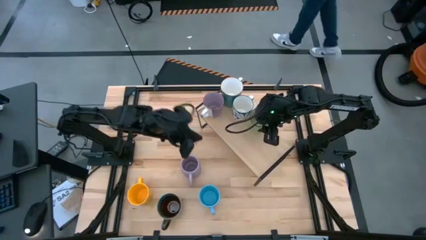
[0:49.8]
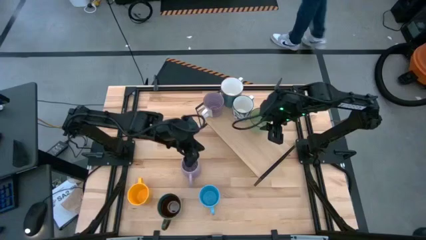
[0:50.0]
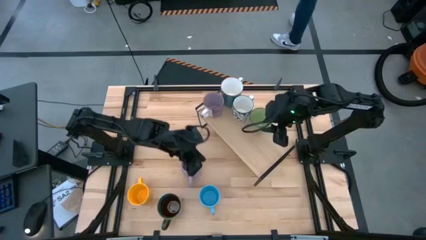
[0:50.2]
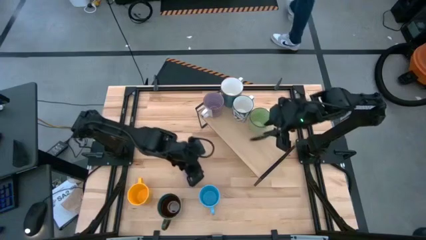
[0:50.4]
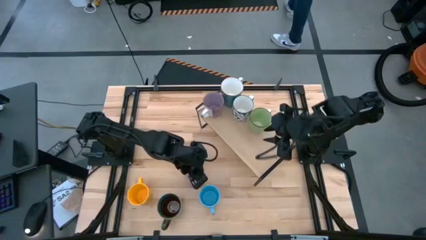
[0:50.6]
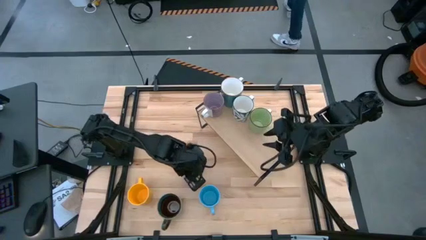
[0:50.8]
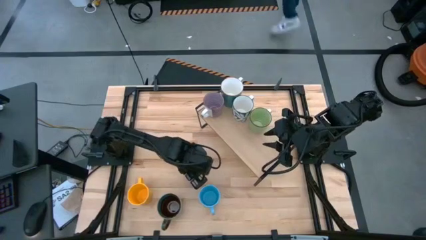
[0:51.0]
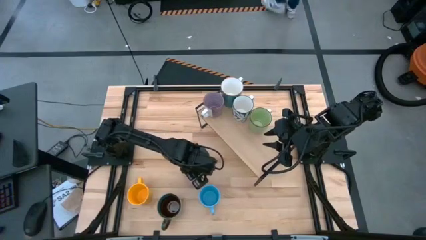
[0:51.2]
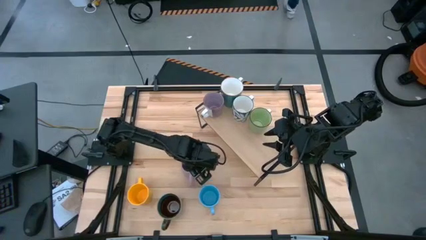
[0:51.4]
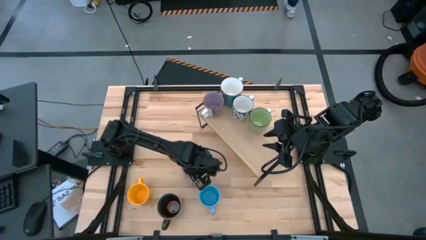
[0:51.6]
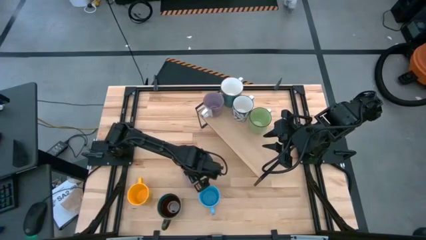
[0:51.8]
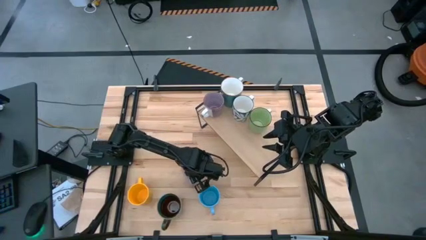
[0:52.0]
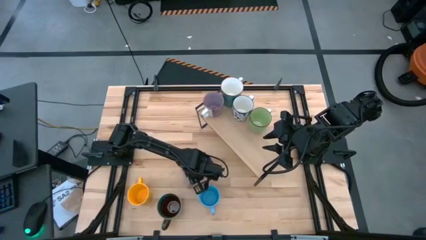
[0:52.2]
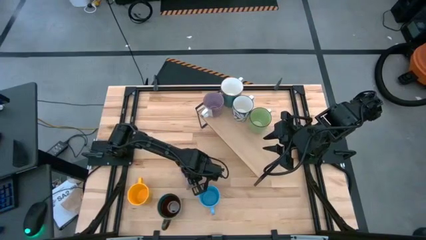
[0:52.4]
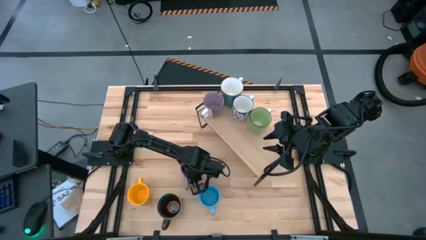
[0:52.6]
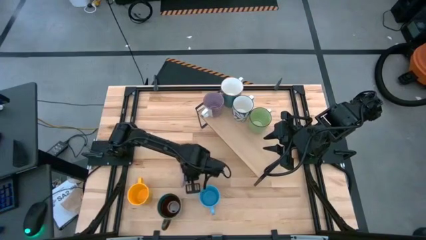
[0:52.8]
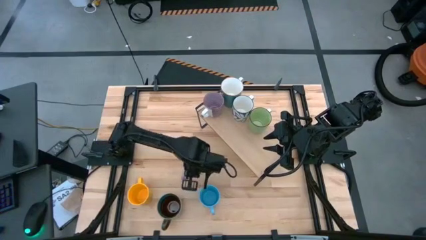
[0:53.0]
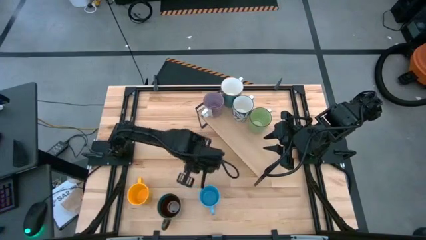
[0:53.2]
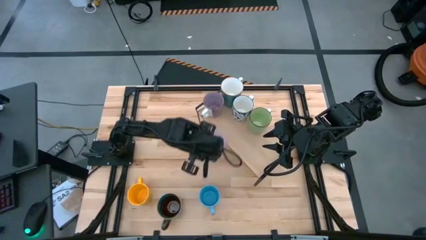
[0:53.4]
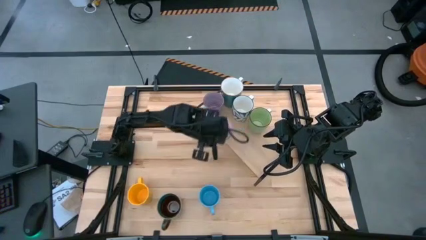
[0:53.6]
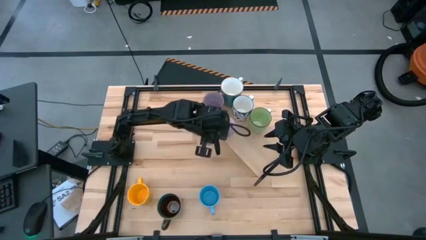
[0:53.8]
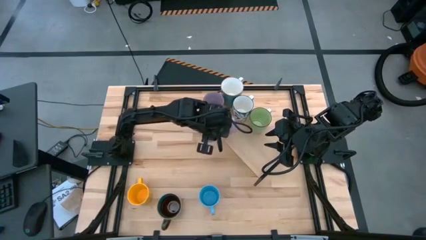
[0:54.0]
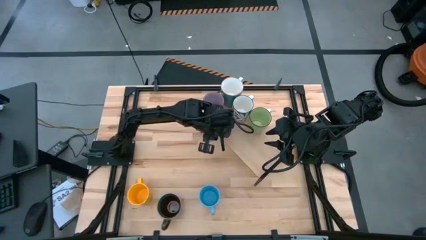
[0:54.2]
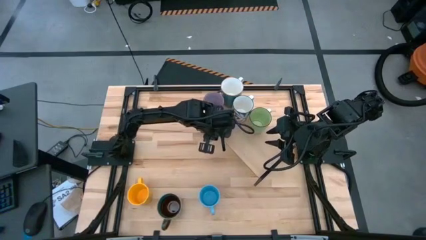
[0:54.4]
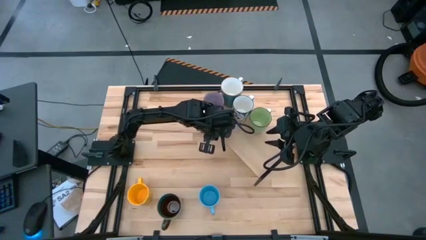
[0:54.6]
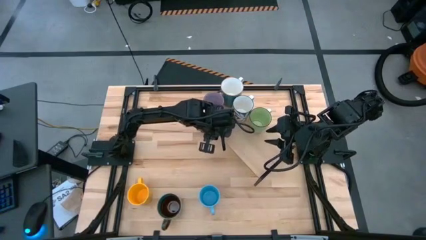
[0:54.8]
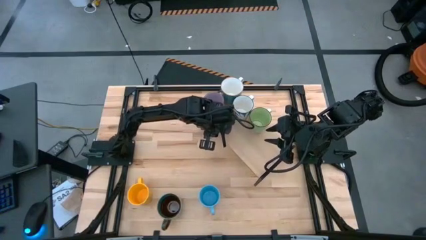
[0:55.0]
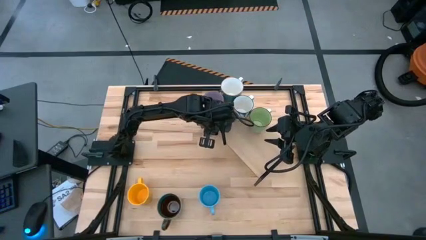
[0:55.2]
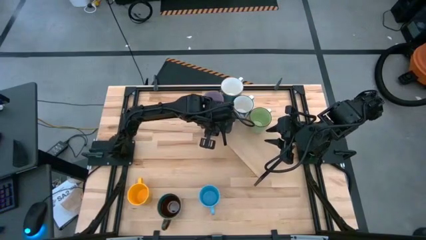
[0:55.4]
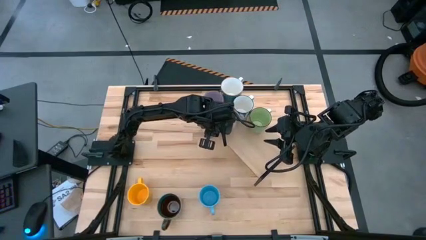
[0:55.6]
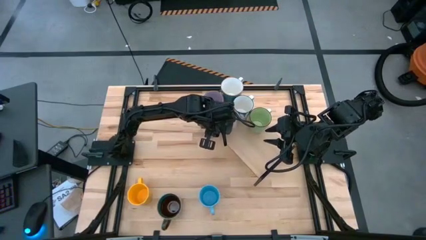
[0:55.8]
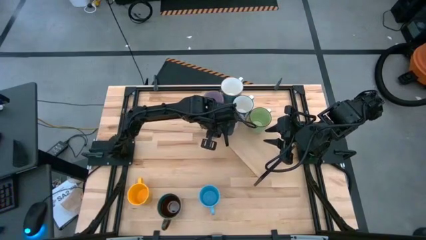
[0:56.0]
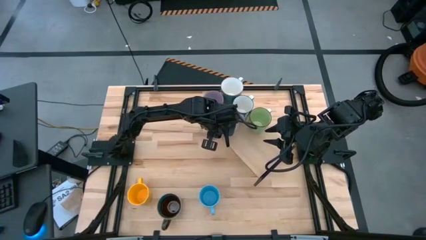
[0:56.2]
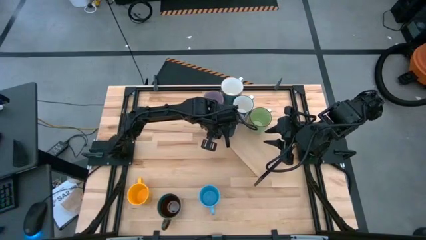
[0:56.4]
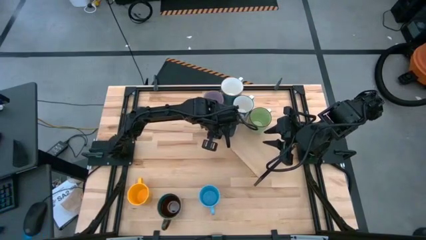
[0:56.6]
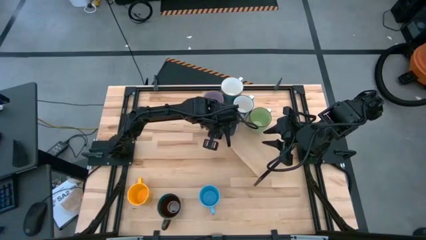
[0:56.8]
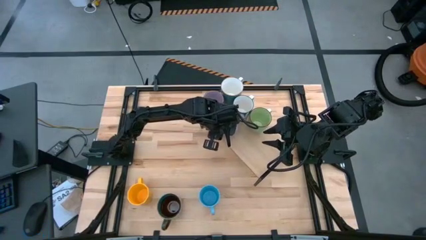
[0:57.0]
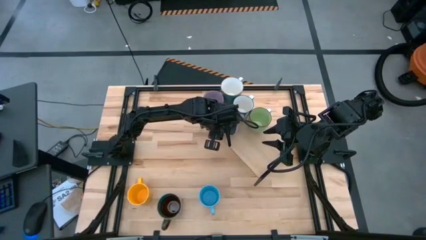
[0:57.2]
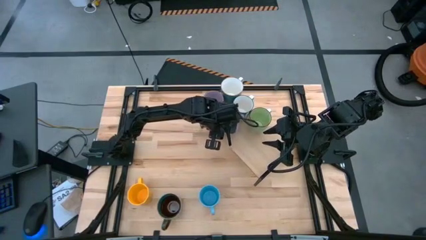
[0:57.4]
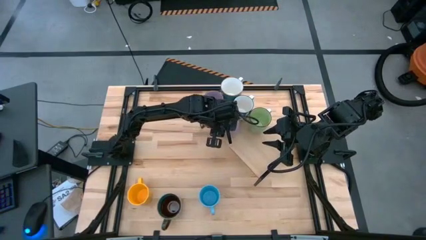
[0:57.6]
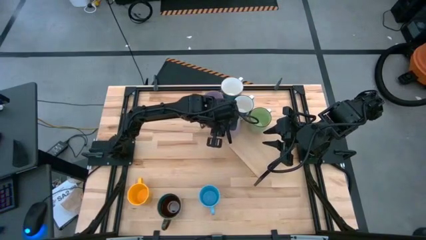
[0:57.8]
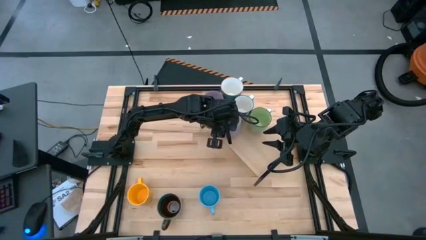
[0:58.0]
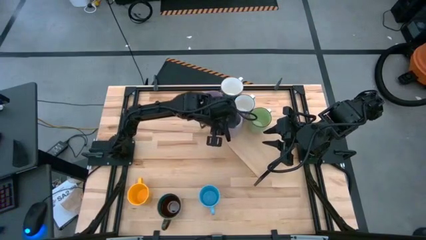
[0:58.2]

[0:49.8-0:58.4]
Task: Place coffee mugs
Put the purple mug on the shelf

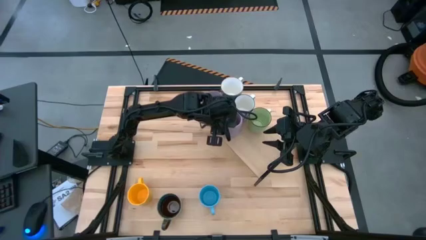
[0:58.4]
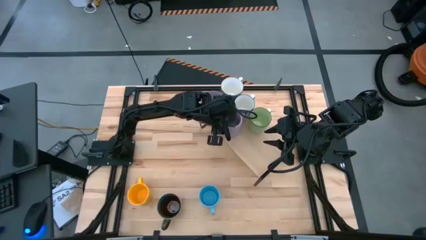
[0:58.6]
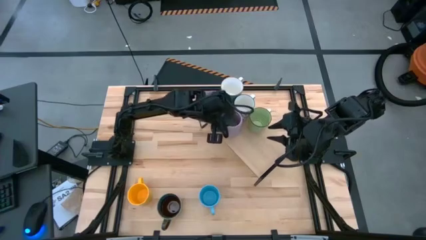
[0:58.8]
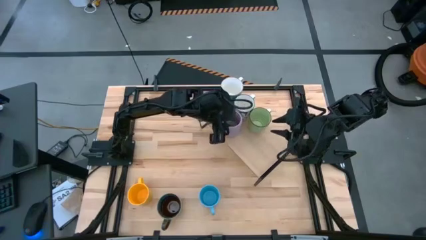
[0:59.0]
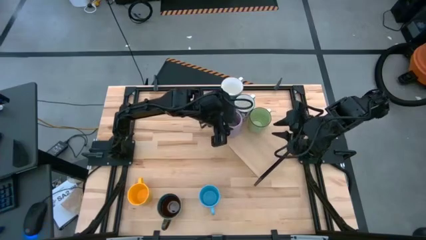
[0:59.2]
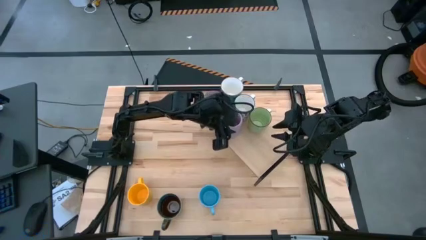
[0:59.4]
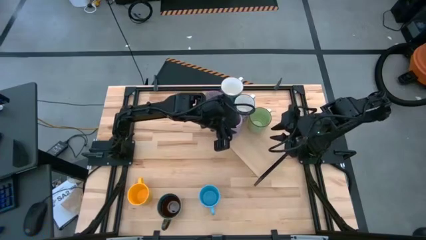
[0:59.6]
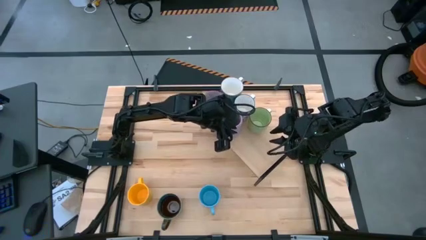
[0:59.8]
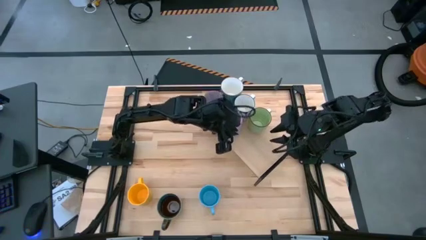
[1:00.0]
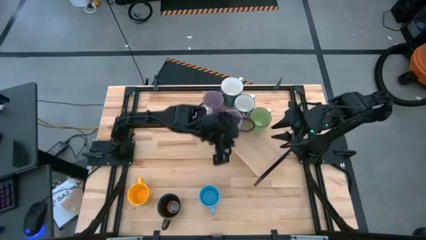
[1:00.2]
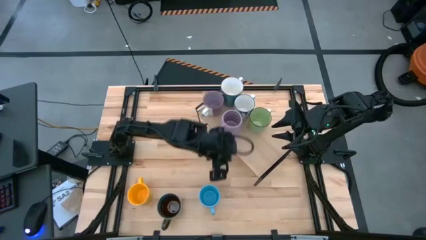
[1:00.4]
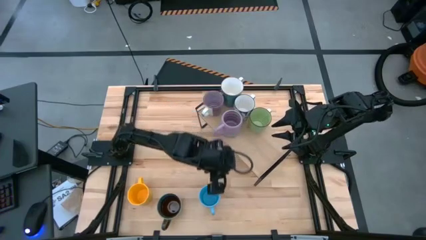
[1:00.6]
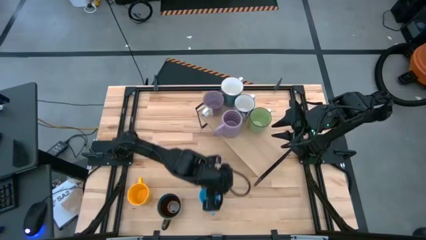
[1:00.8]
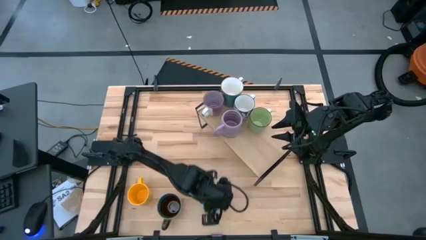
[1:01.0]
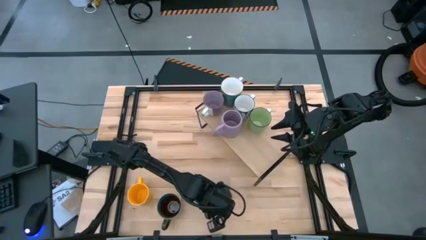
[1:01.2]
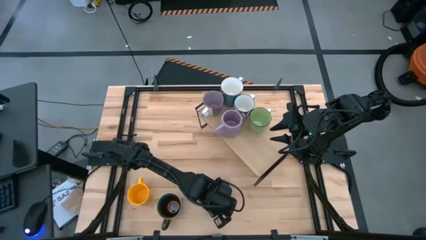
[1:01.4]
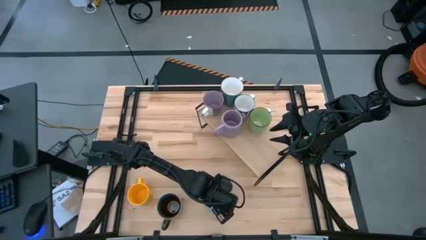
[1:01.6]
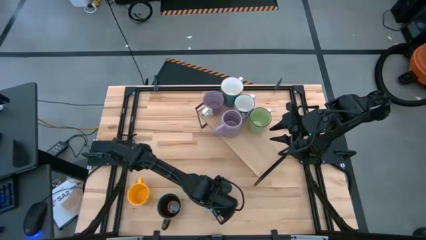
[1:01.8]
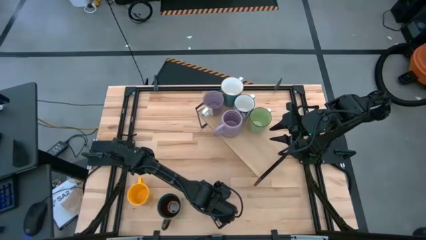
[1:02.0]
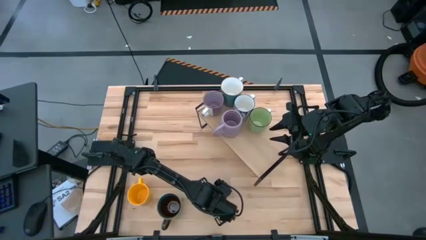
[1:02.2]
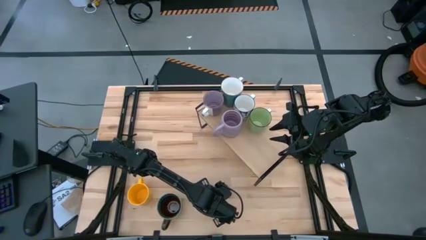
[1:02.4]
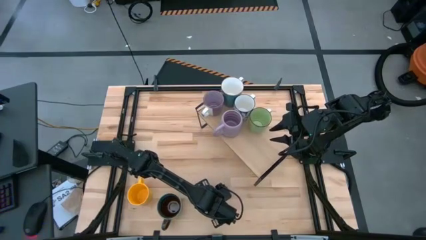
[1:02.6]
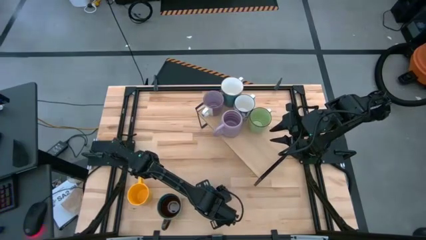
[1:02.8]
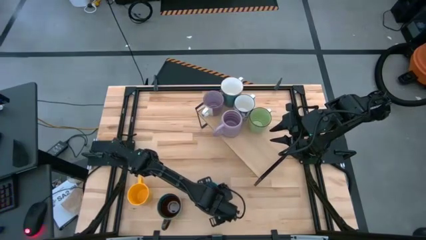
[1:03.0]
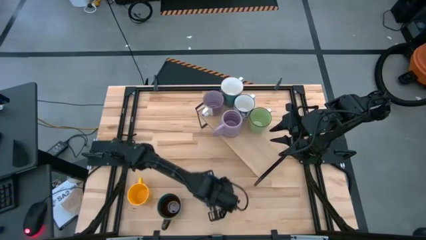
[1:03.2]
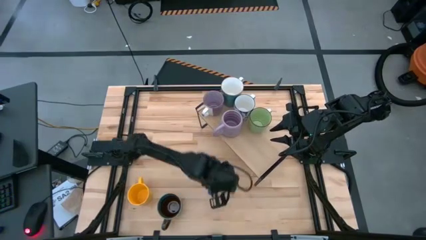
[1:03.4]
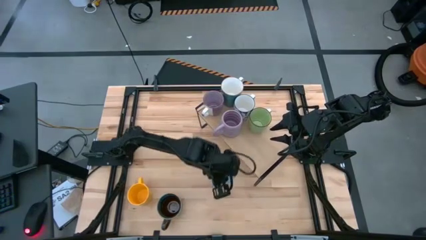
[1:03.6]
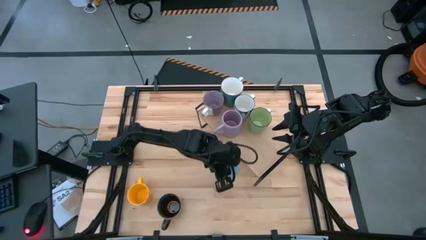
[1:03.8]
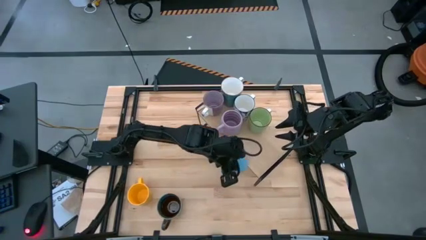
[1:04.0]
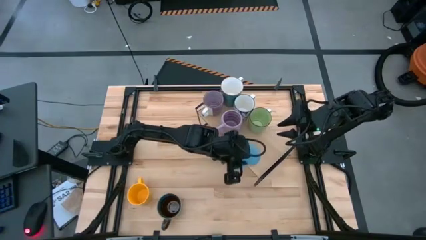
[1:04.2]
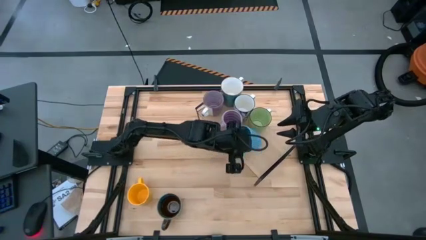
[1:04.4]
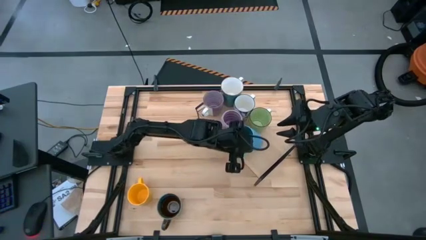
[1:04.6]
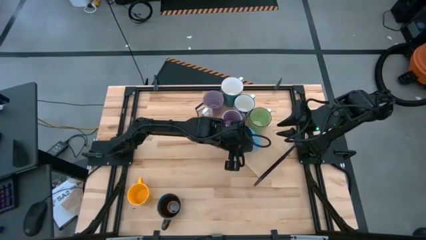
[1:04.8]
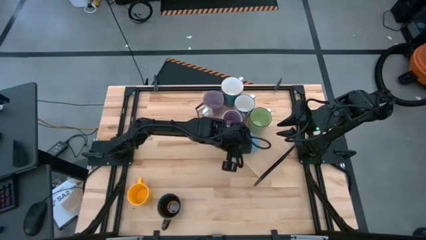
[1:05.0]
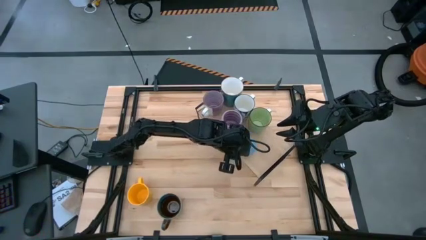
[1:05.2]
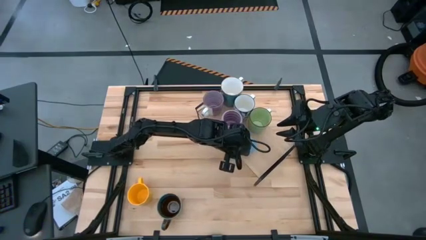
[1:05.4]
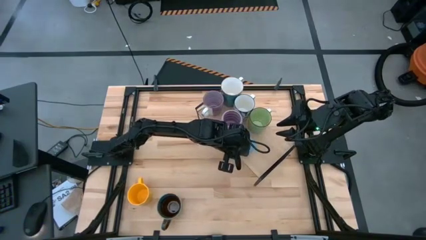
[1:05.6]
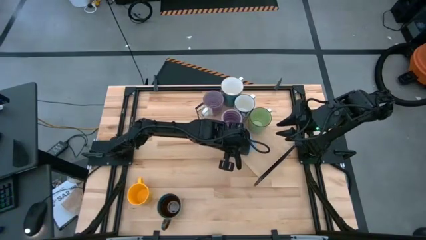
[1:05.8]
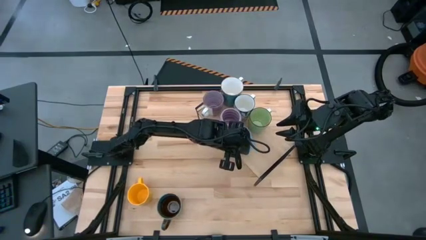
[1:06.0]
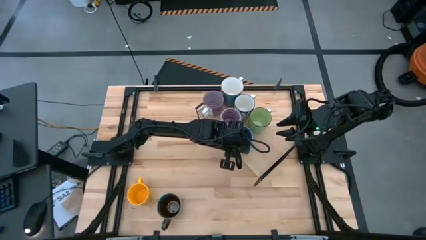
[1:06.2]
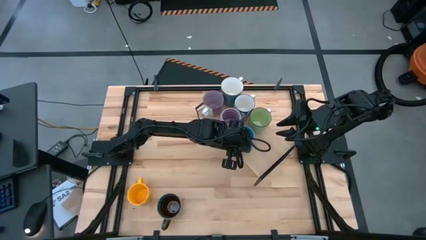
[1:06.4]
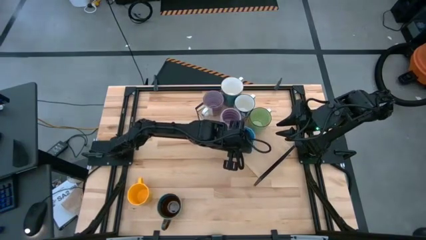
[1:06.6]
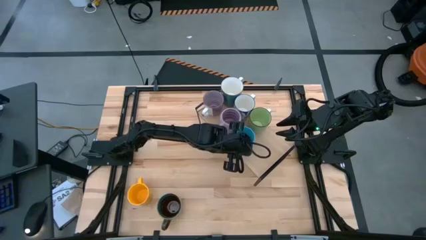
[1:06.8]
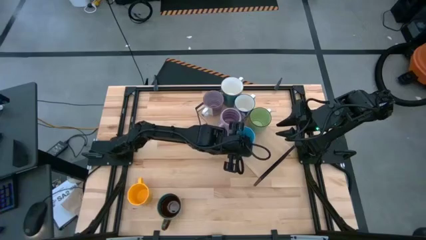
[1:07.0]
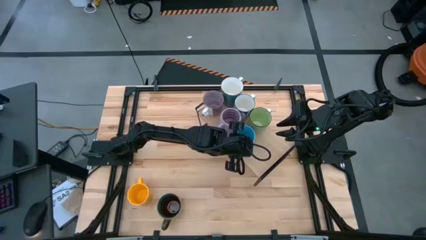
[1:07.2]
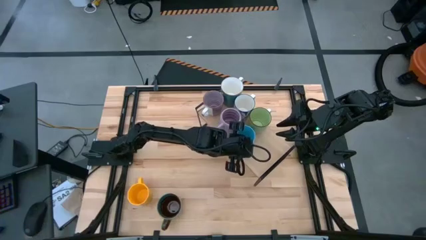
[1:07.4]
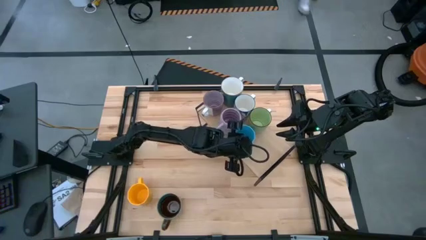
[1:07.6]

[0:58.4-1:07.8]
Put the light blue mug on the shelf
